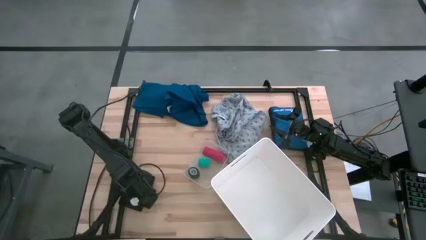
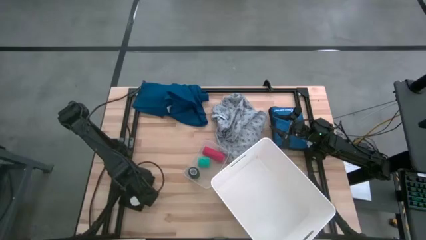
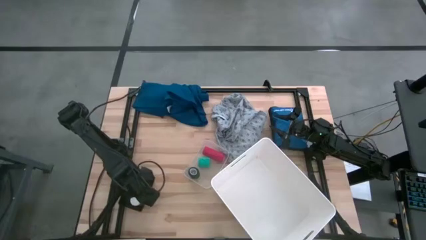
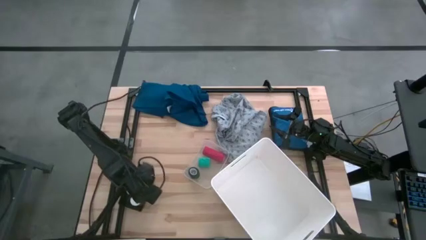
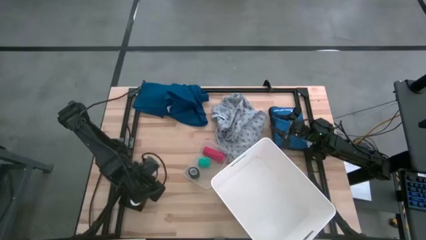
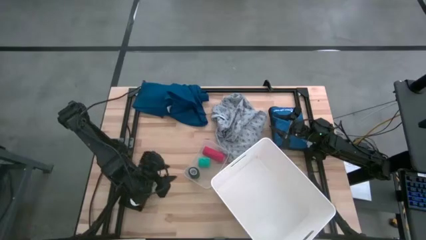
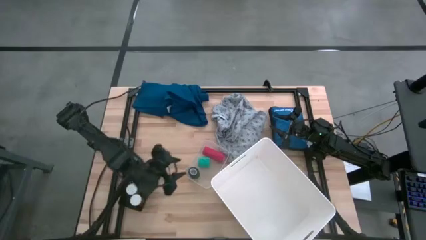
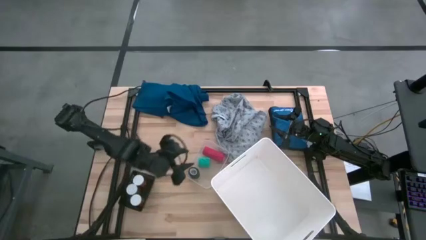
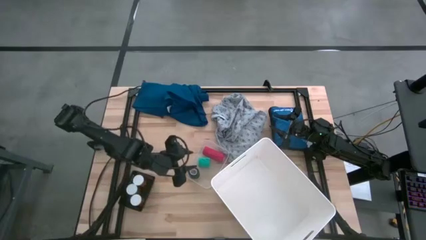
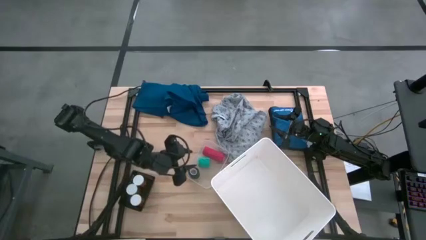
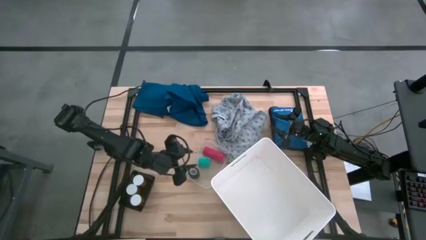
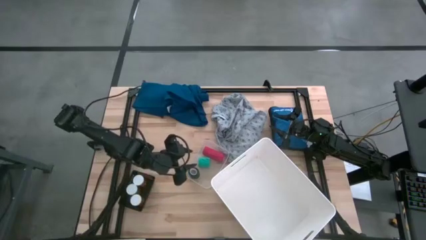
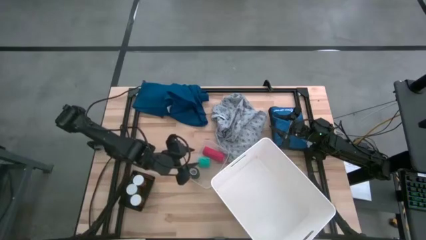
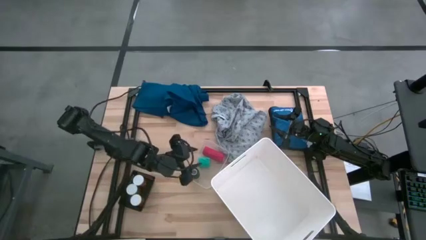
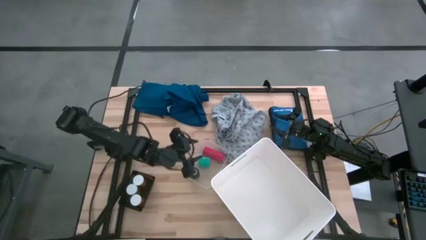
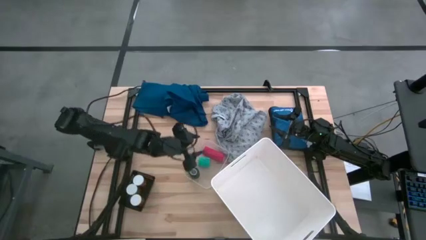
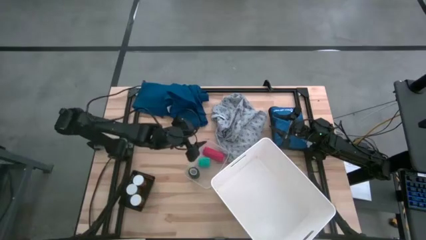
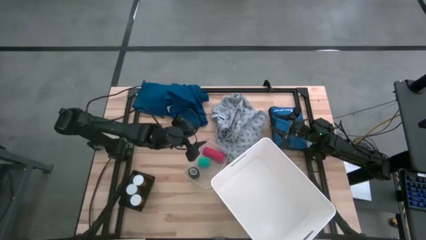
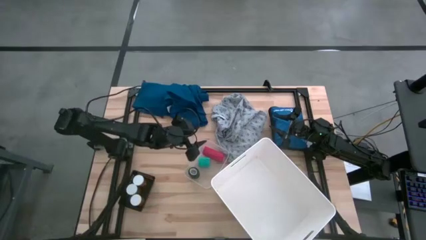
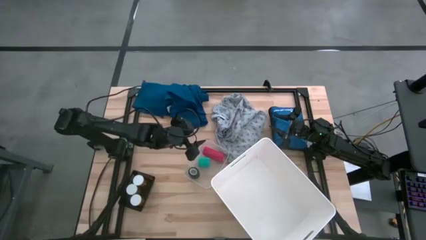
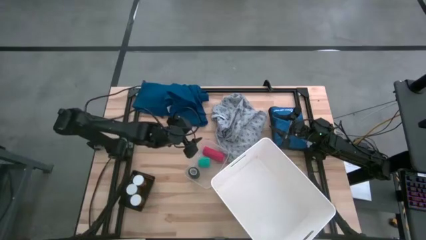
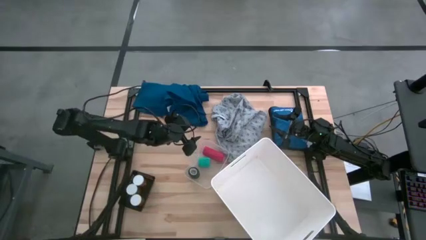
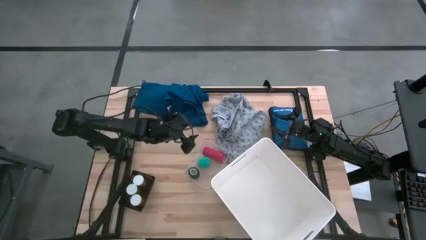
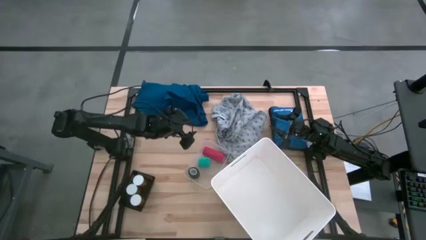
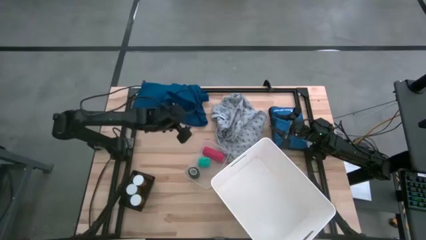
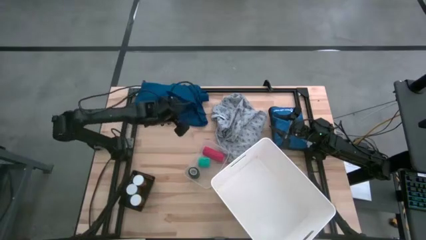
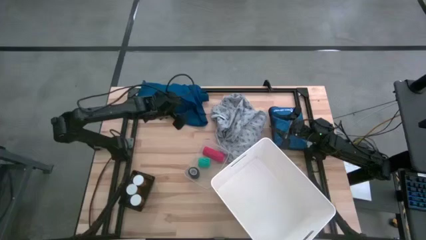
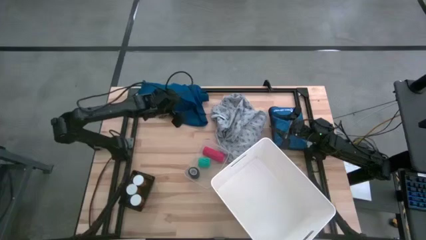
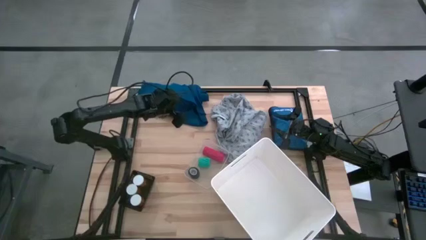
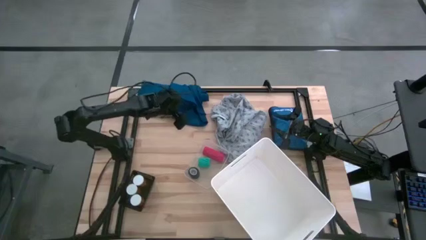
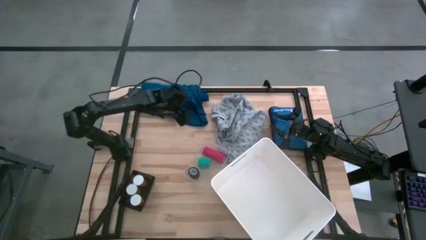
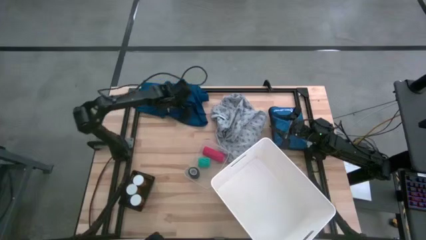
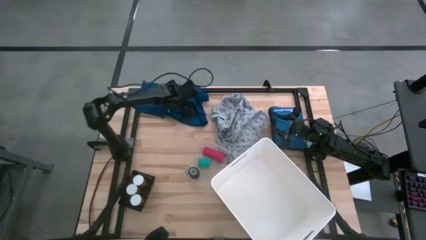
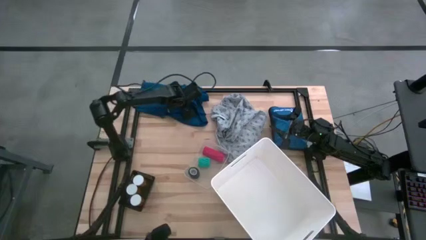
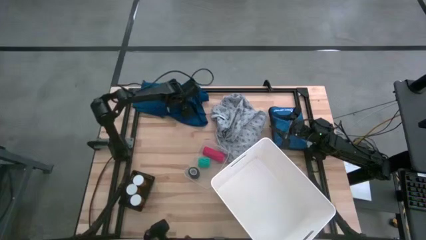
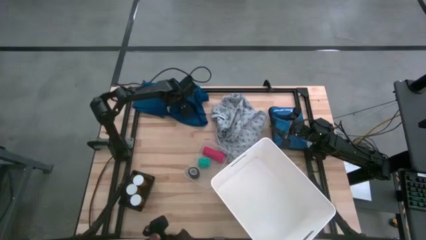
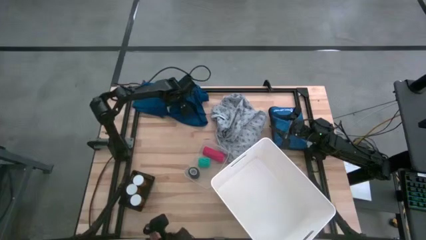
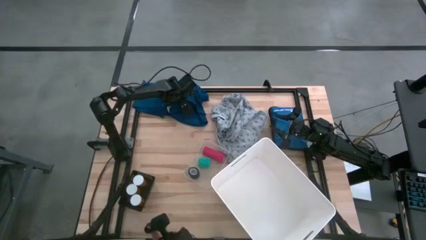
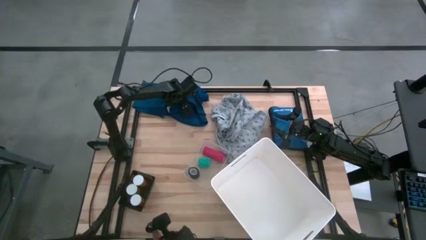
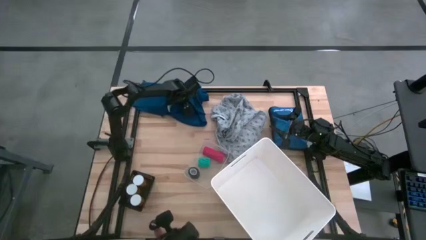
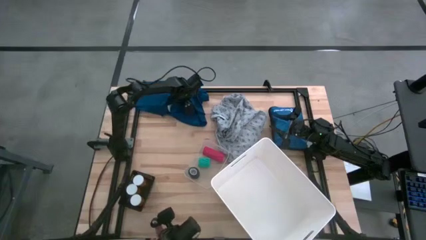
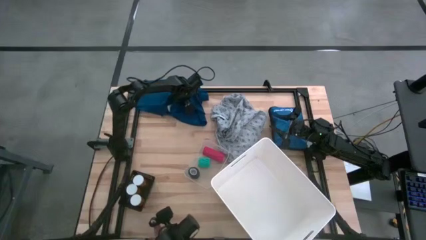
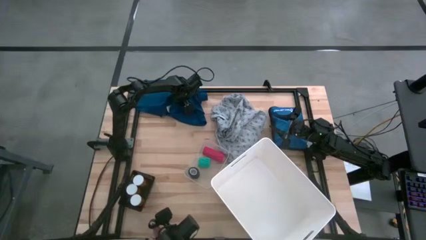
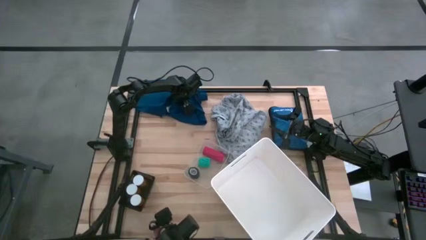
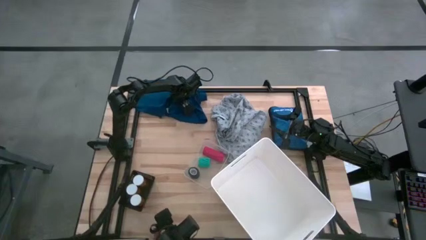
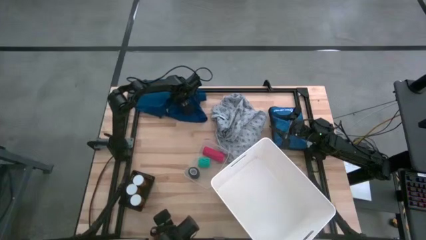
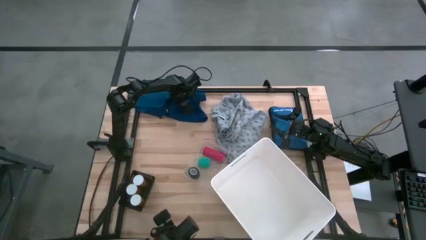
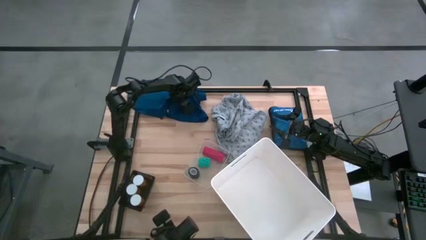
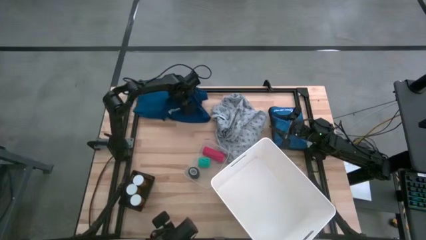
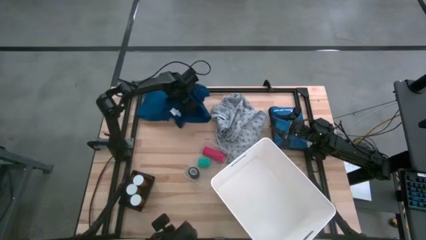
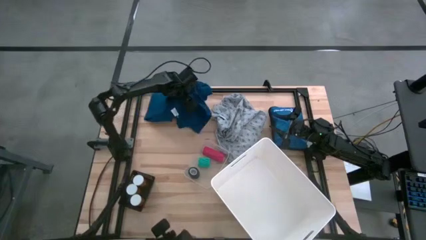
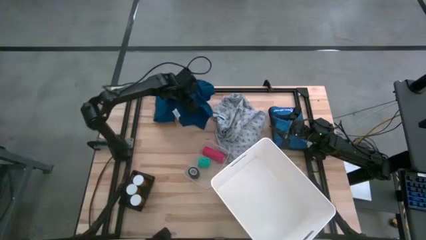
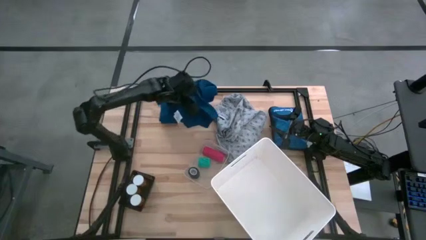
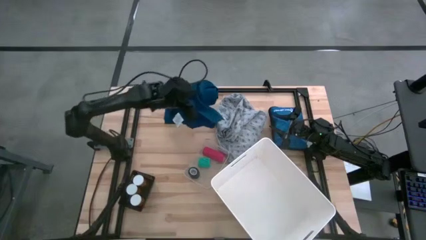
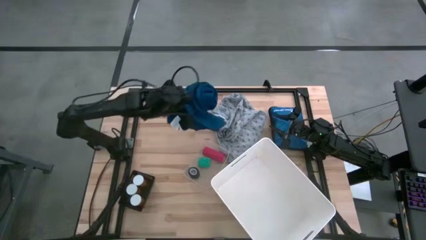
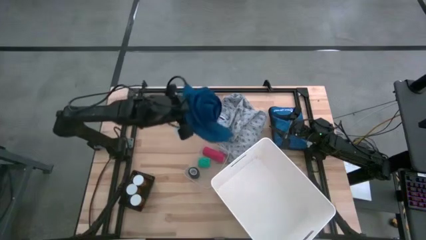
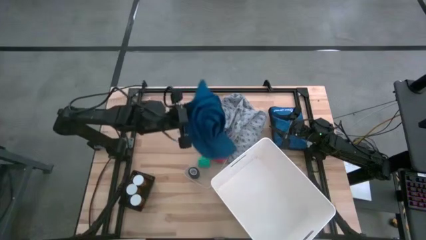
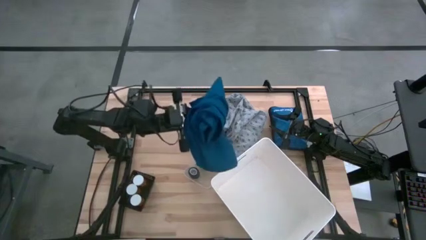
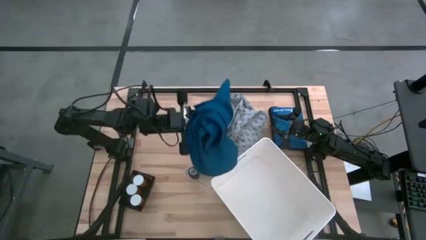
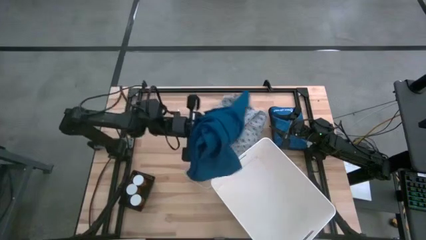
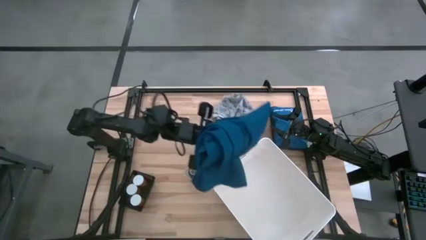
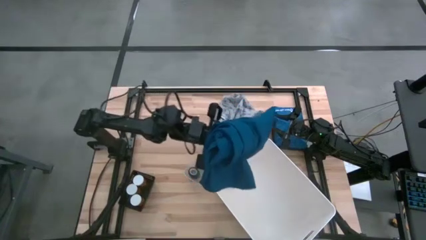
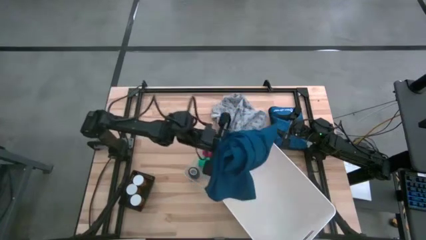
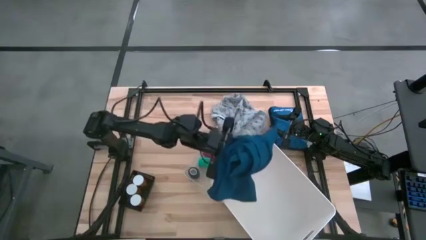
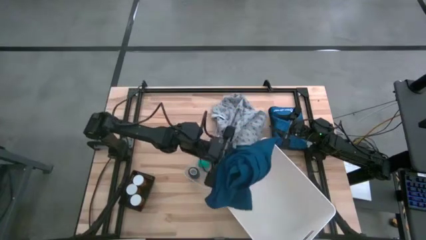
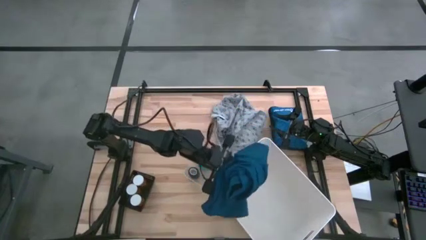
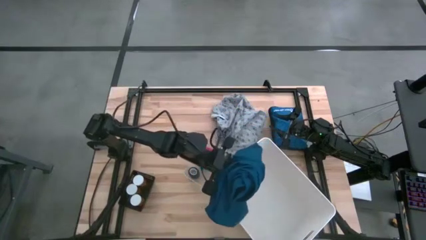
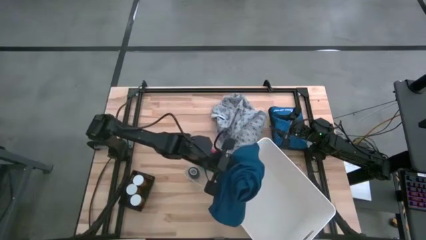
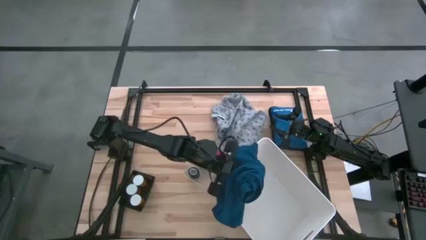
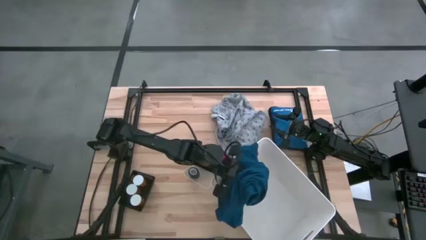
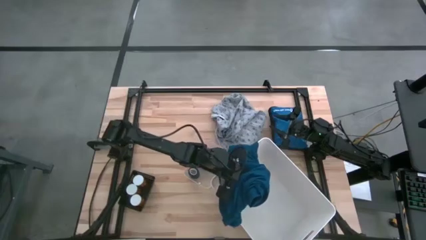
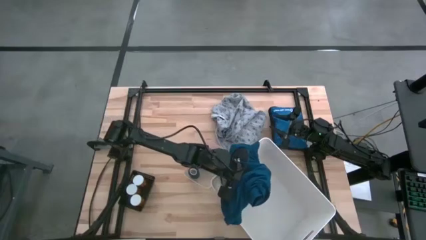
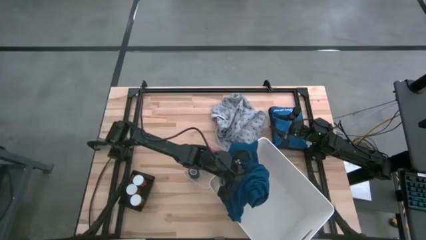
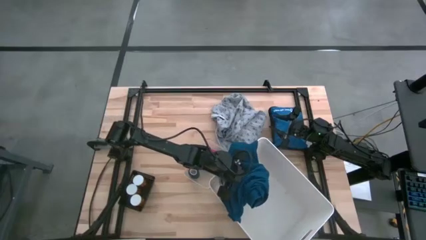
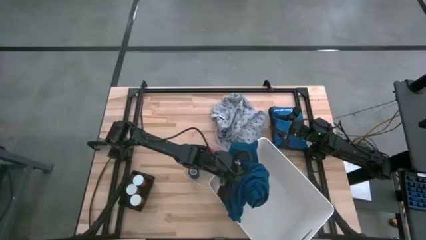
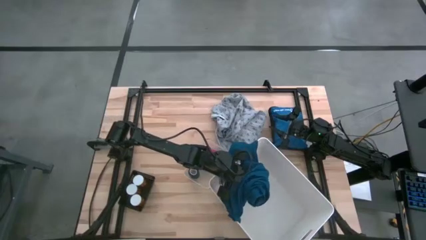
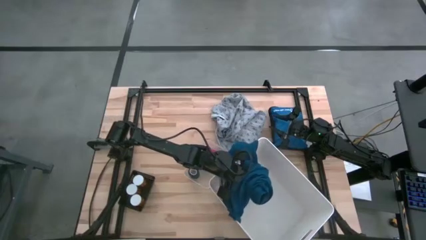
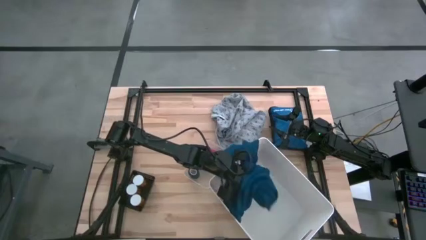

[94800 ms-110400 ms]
Task: Pick & Place Medicine items
Put the blue patient gown into the white bin

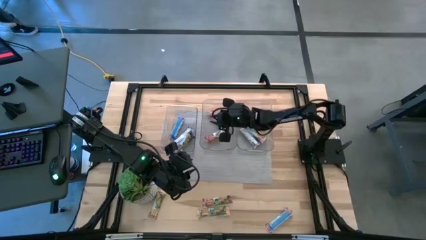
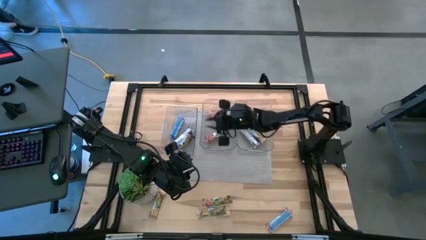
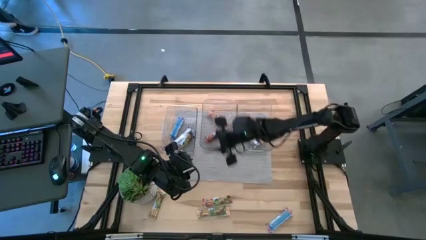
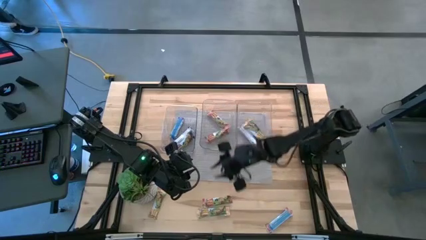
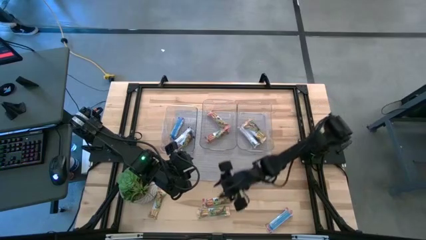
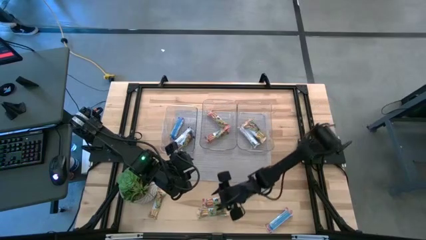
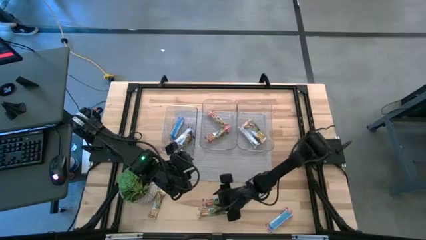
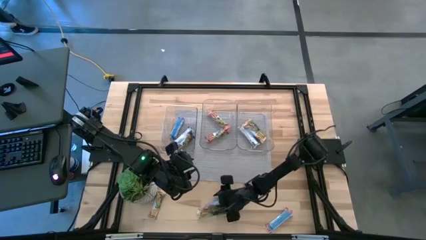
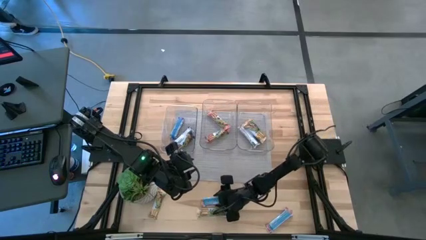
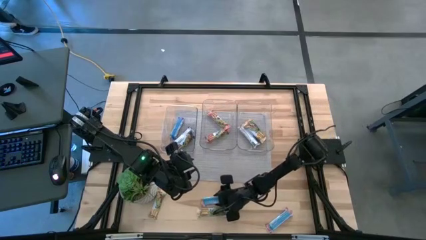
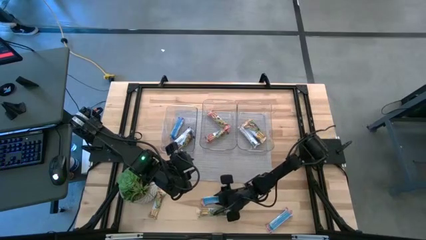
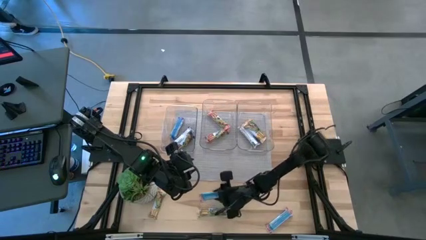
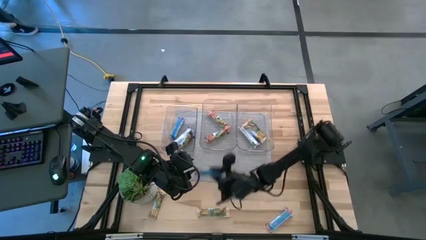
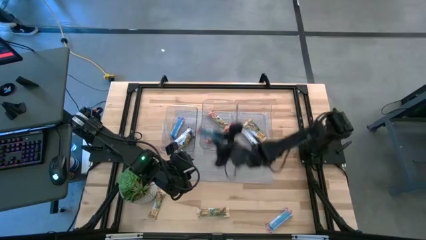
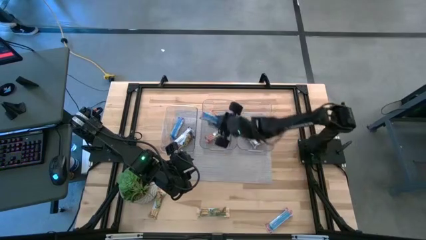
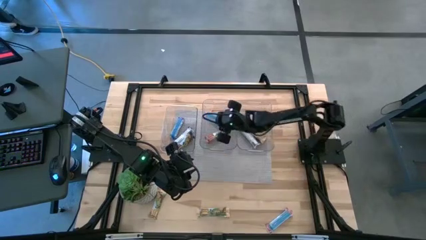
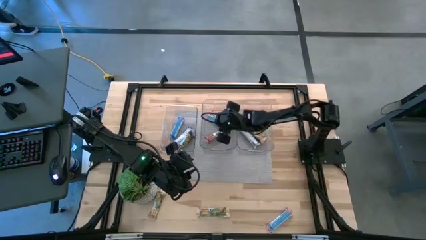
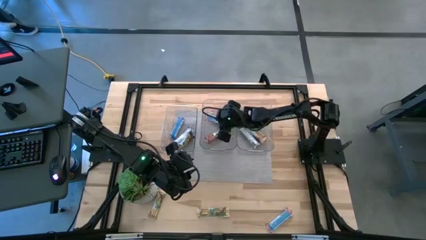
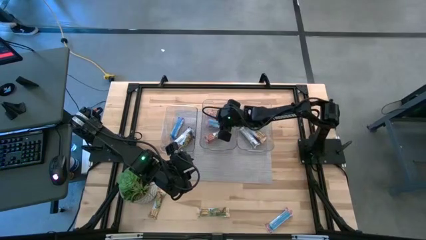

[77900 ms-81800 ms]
Task: Pick and place Granola Bars by type
Put the red granola bar into the middle transparent bin
